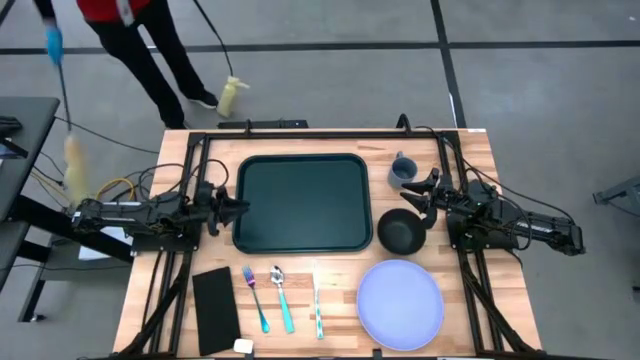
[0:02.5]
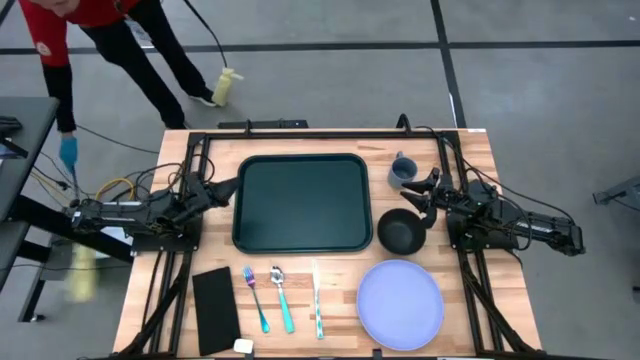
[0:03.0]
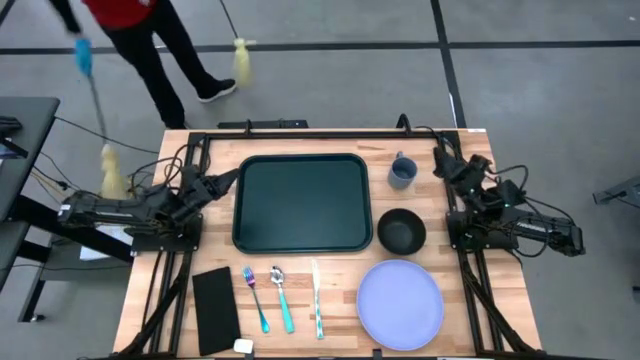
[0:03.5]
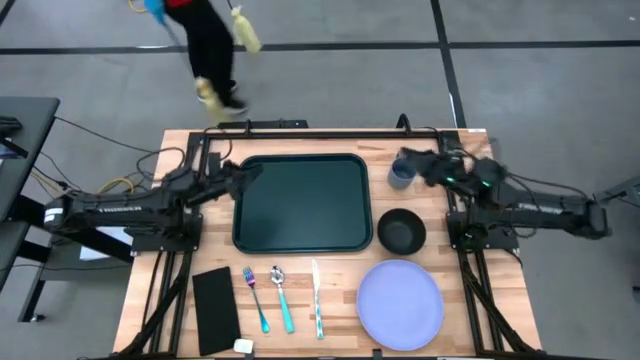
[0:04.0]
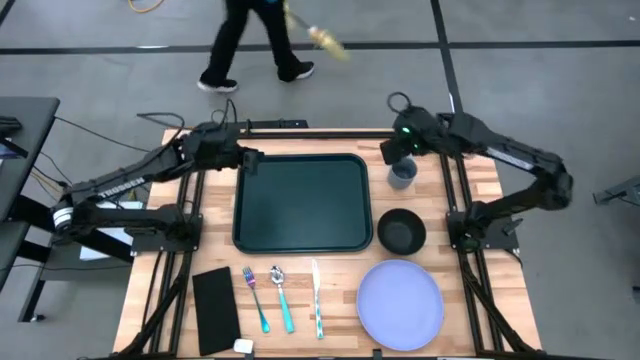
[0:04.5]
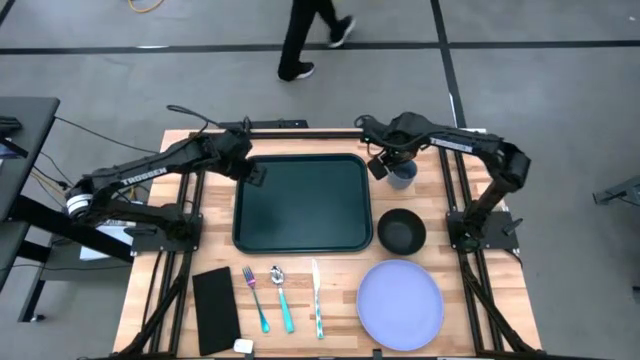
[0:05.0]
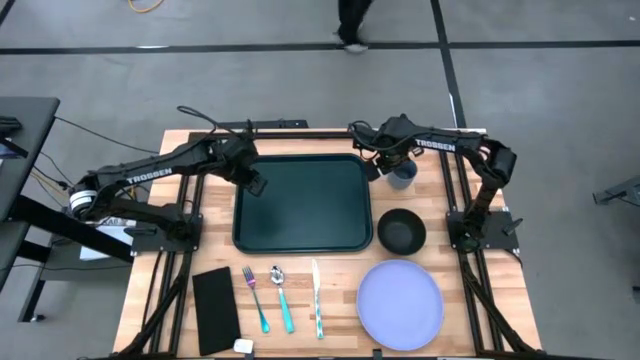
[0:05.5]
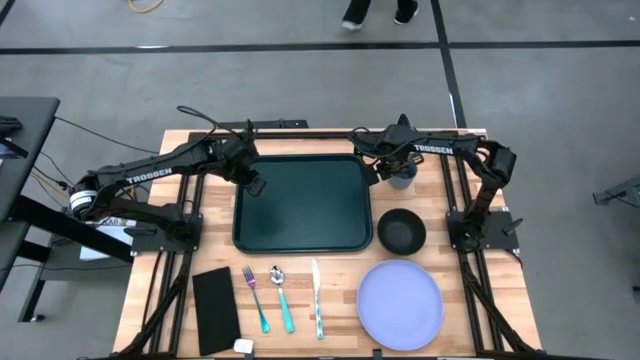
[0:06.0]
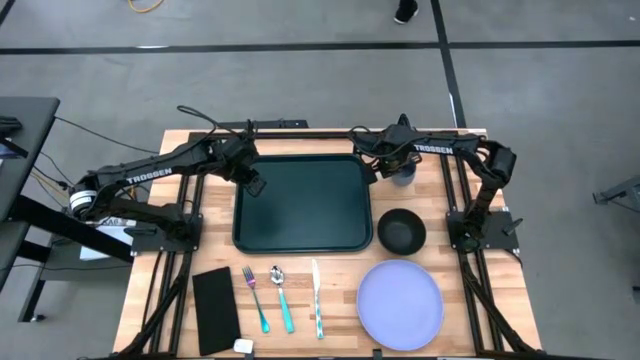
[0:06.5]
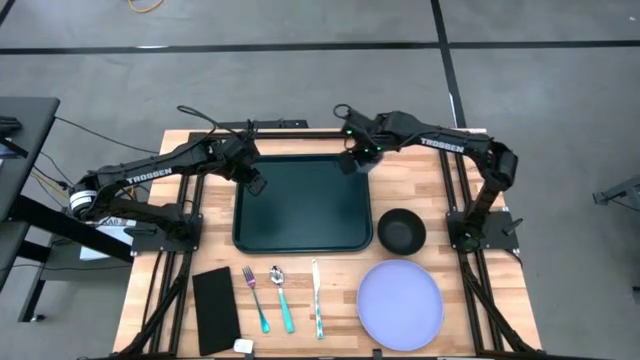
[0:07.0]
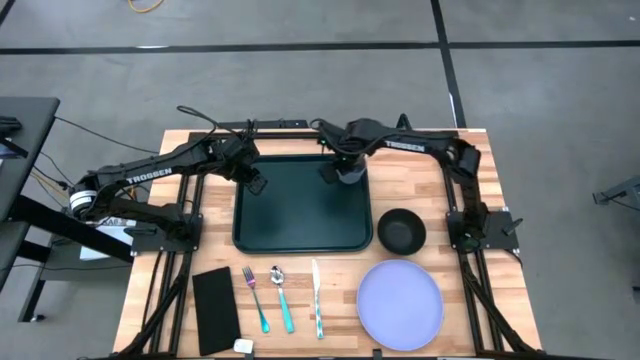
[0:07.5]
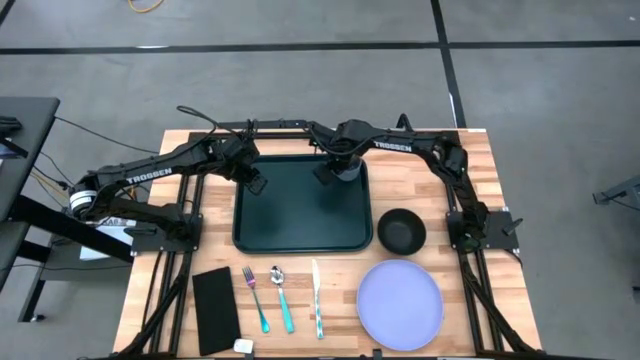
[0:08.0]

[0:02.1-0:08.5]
Task: Set up tray
Put the blue mug on the green serving tray

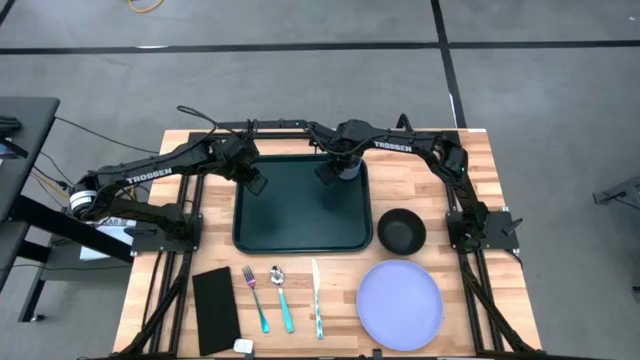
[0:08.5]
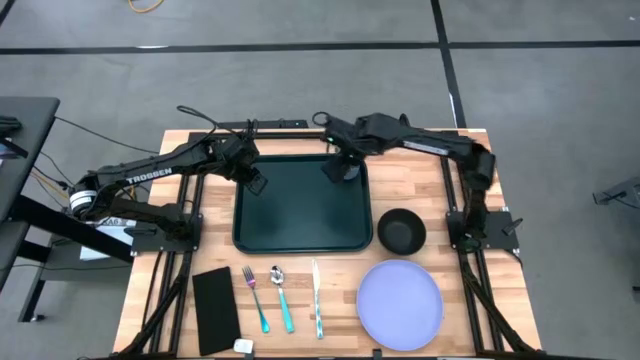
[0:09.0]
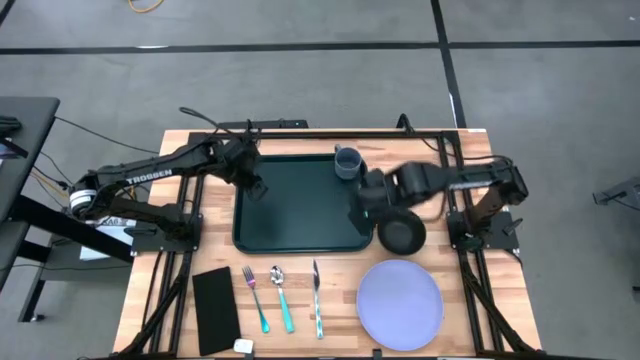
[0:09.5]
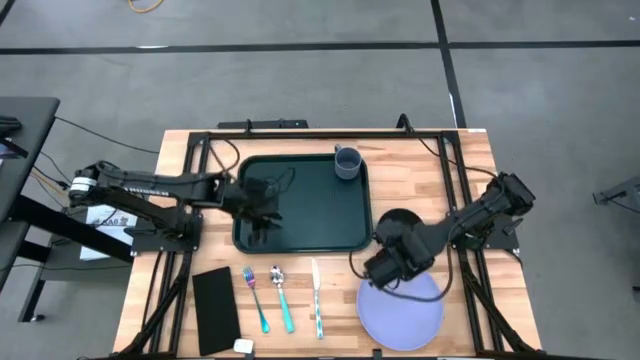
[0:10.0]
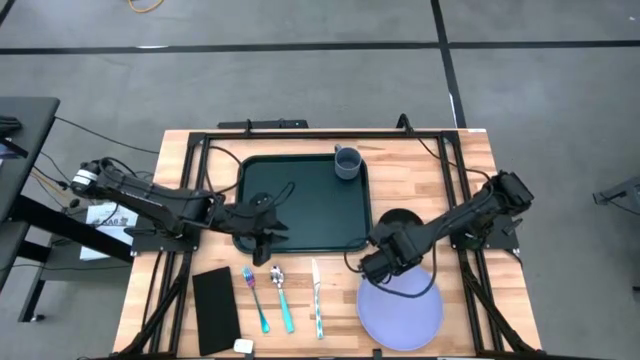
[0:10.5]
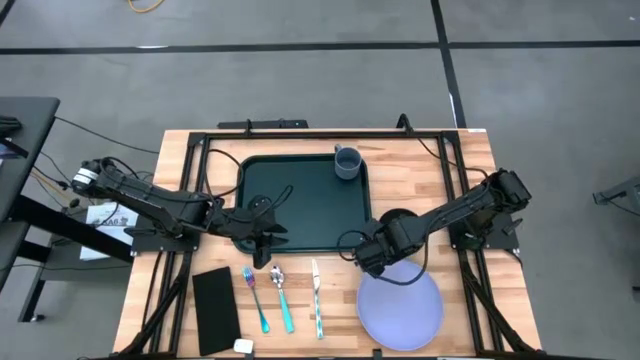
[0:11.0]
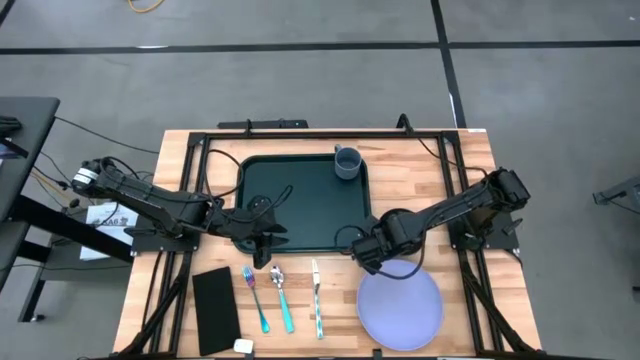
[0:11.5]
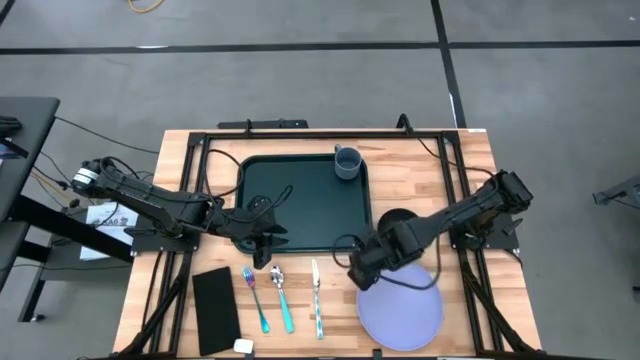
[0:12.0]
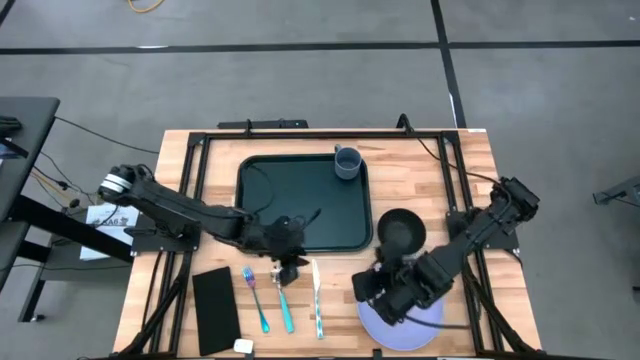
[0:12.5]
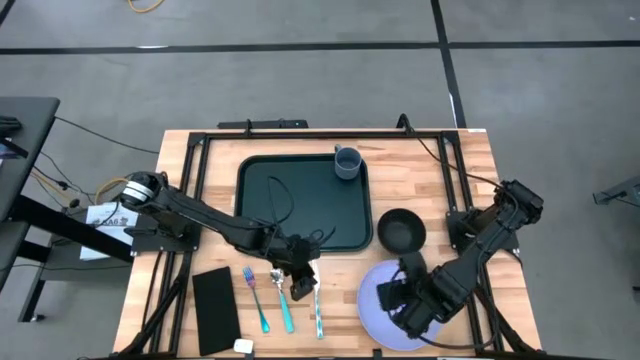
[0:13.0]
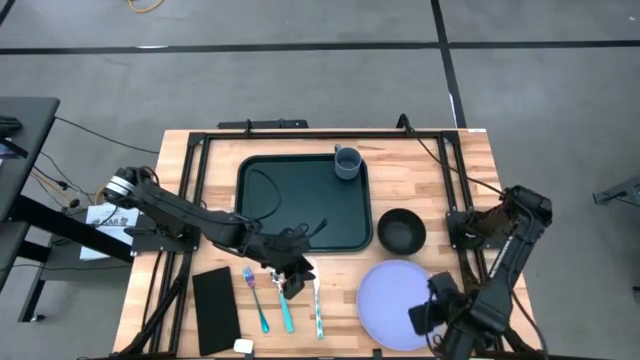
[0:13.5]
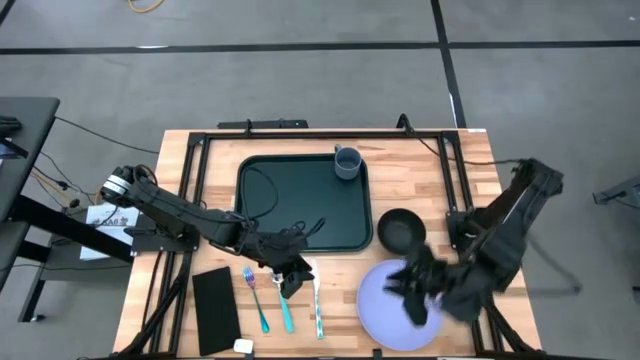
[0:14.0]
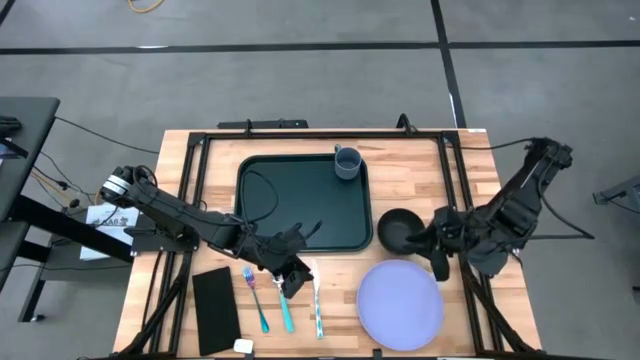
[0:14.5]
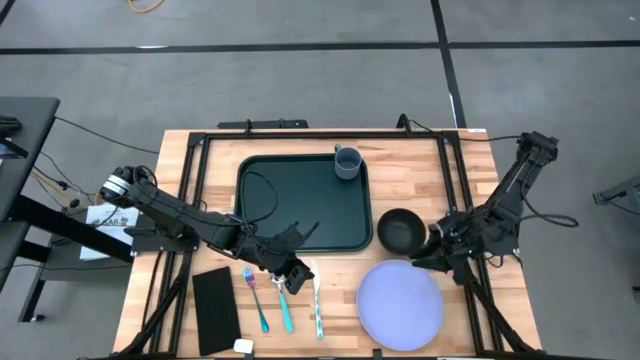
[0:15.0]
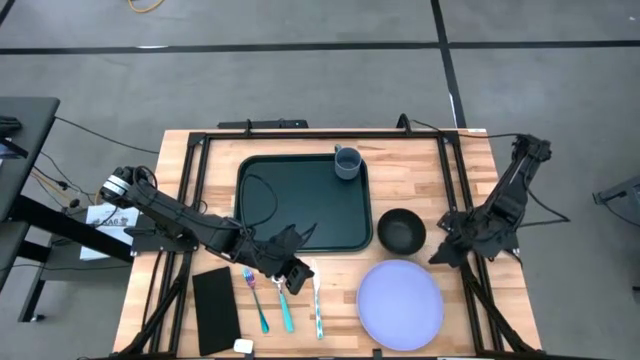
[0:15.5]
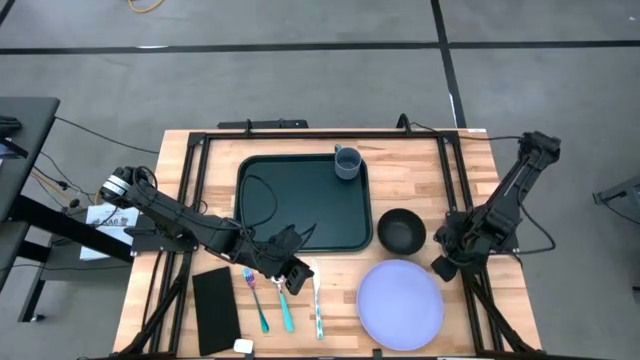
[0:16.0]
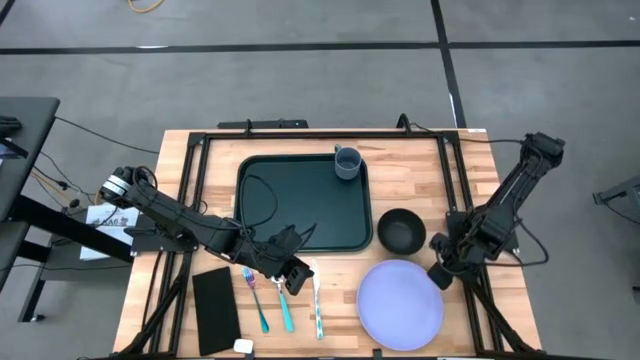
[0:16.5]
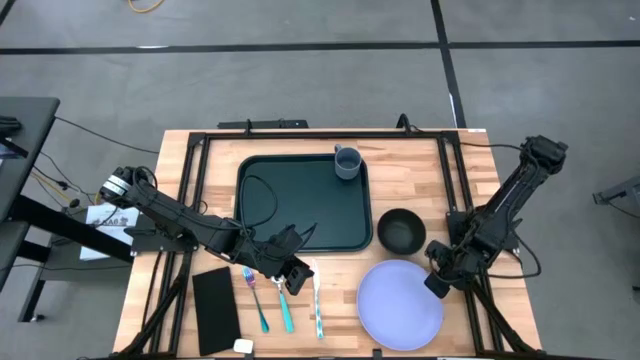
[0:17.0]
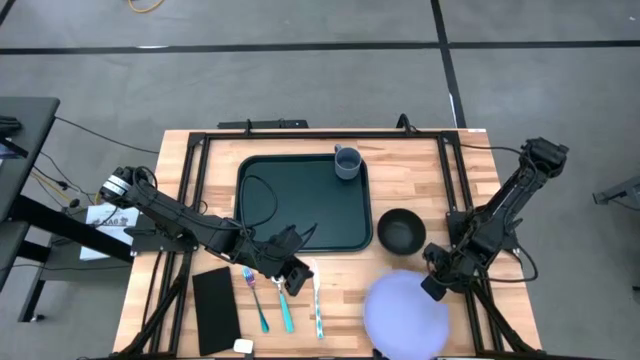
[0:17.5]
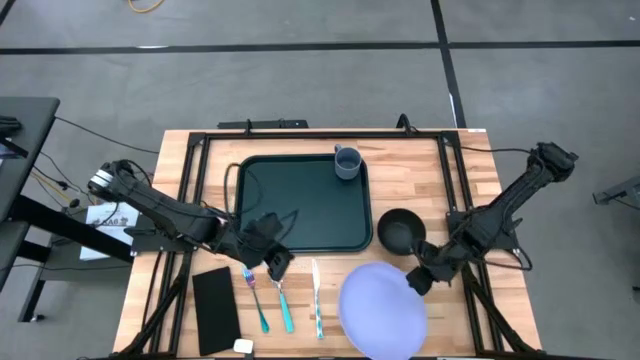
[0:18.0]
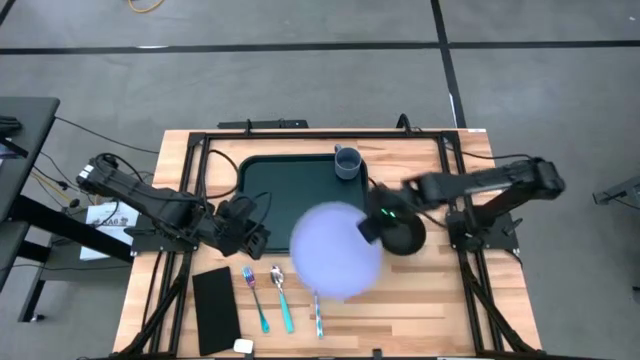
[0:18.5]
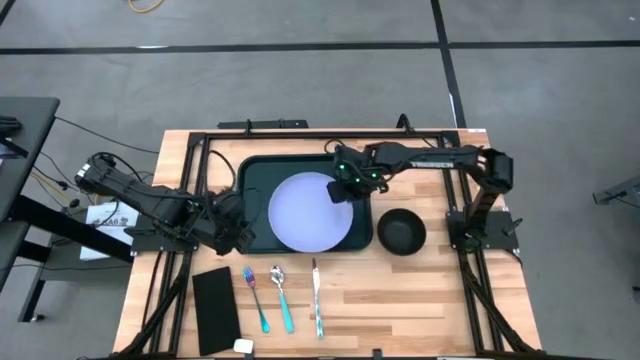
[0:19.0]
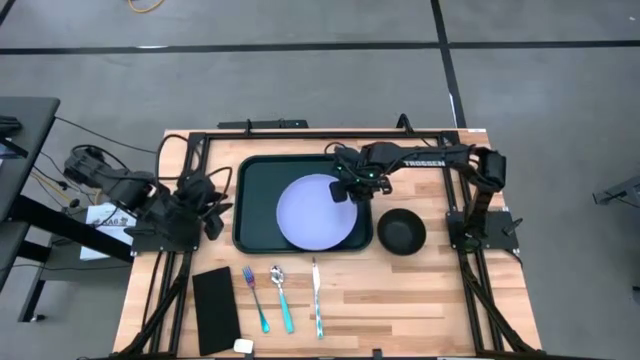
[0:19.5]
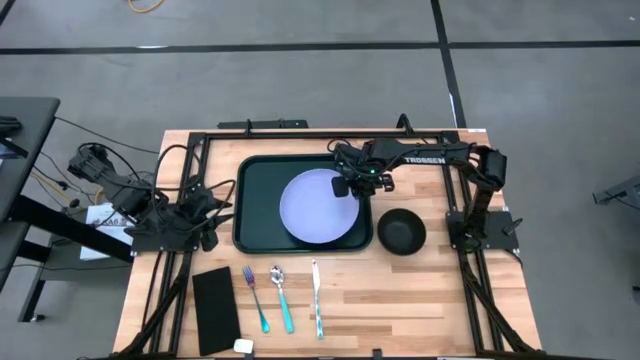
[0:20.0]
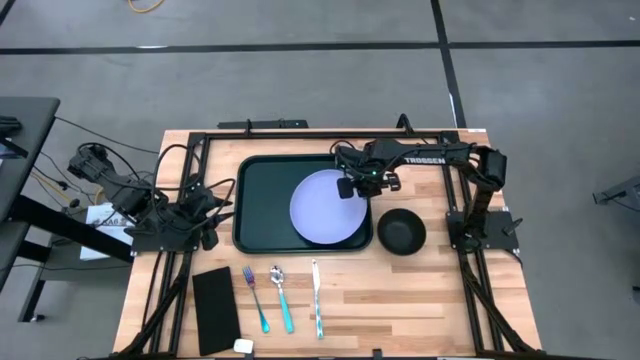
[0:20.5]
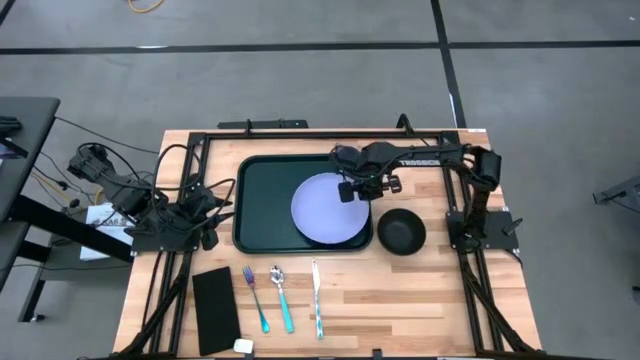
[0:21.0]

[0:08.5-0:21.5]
Put the purple plate on the green serving tray below the blue mug
